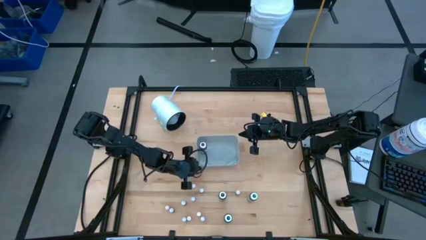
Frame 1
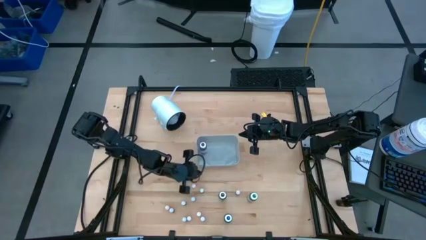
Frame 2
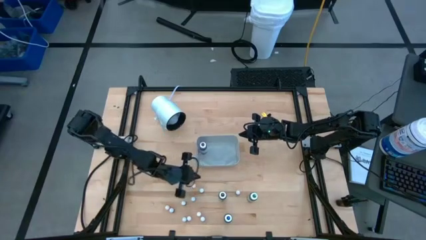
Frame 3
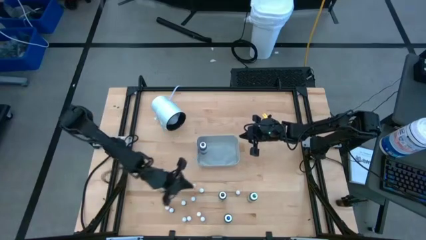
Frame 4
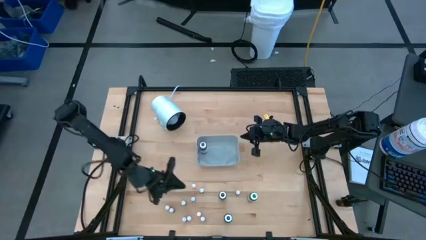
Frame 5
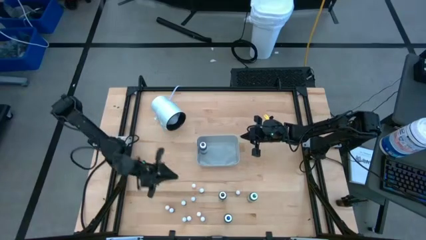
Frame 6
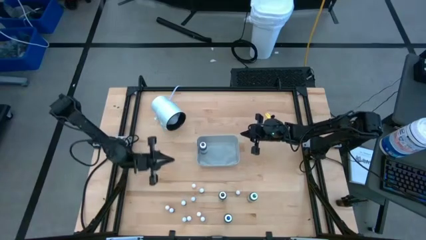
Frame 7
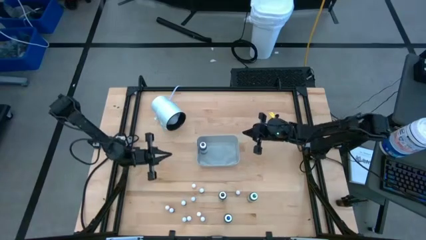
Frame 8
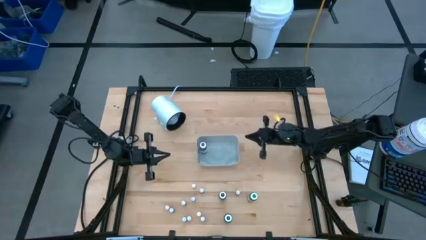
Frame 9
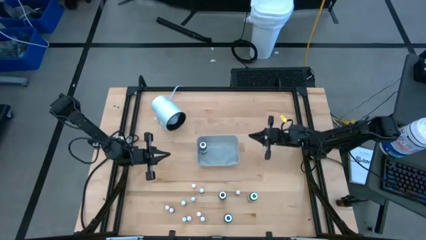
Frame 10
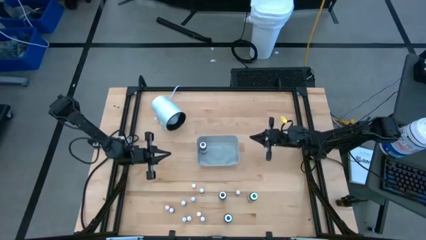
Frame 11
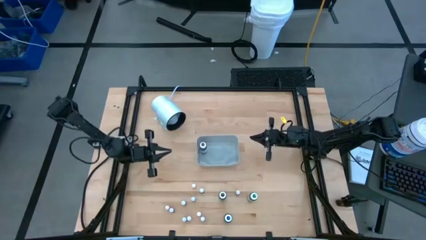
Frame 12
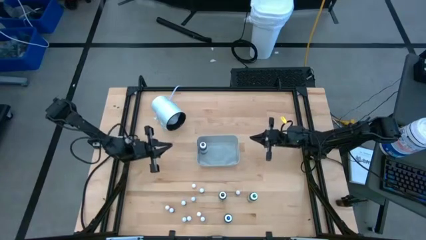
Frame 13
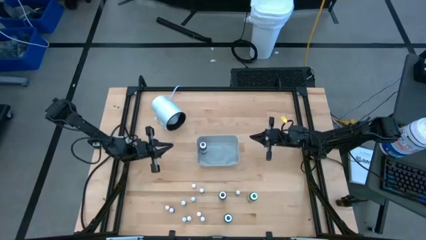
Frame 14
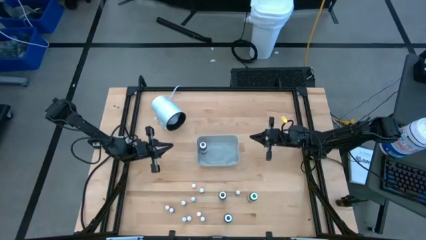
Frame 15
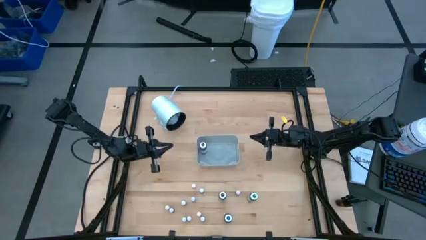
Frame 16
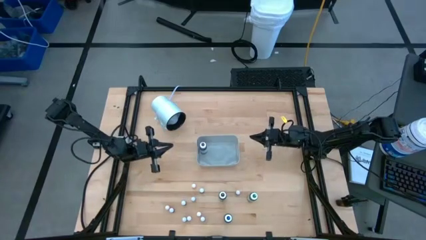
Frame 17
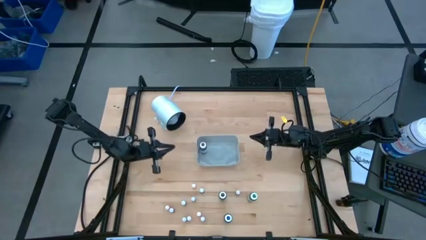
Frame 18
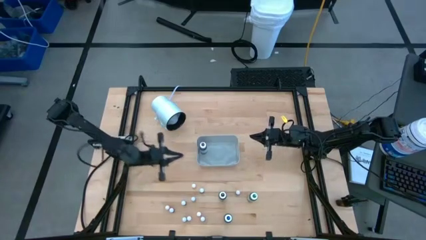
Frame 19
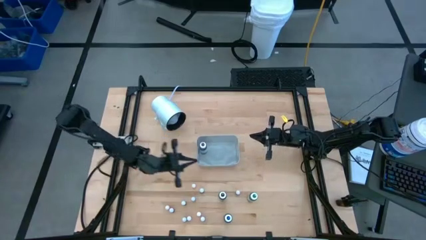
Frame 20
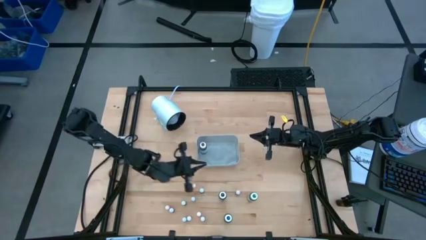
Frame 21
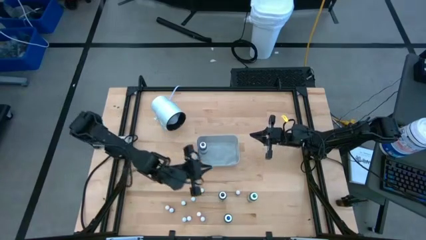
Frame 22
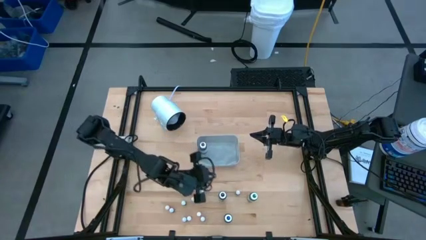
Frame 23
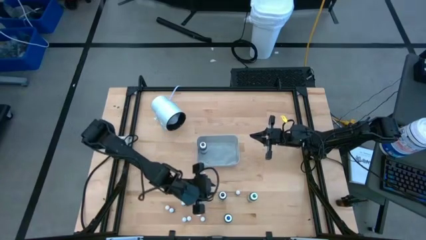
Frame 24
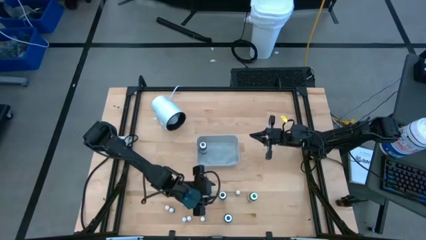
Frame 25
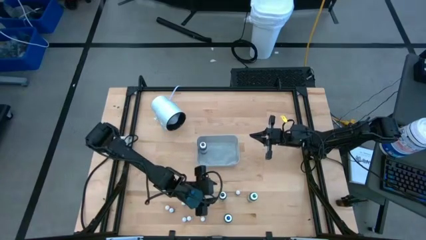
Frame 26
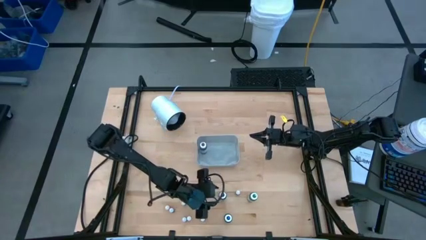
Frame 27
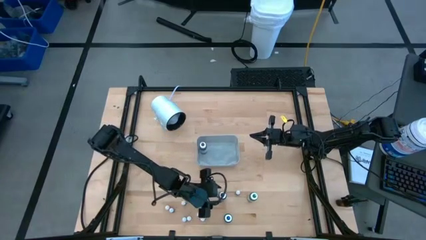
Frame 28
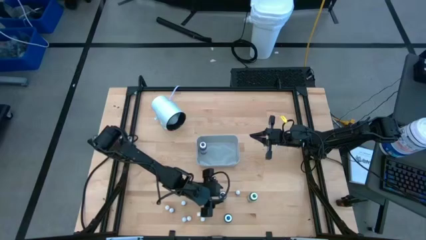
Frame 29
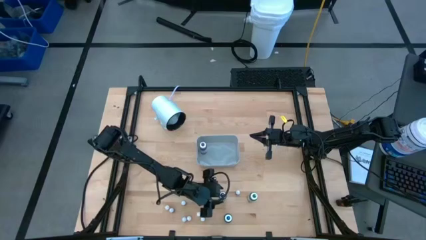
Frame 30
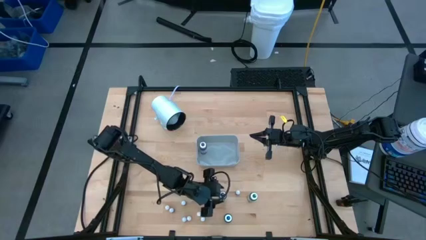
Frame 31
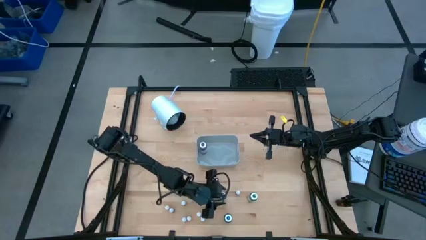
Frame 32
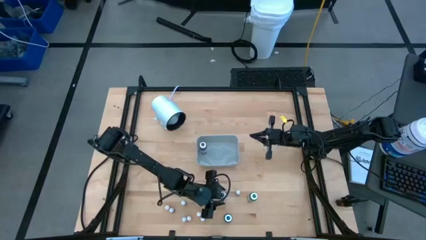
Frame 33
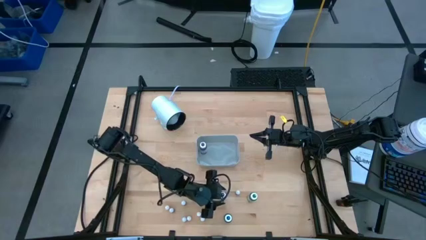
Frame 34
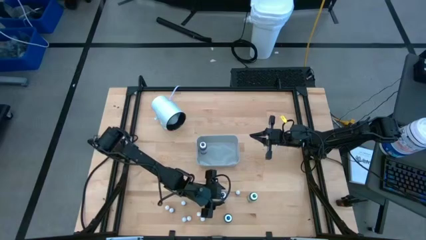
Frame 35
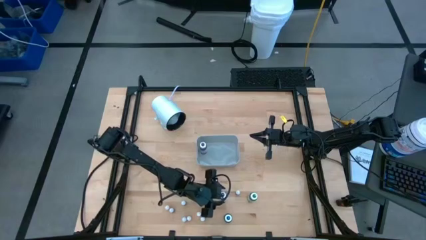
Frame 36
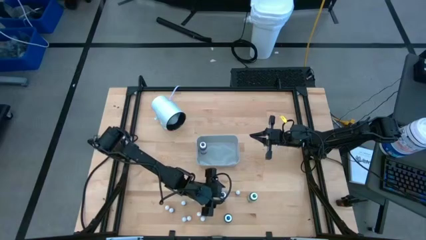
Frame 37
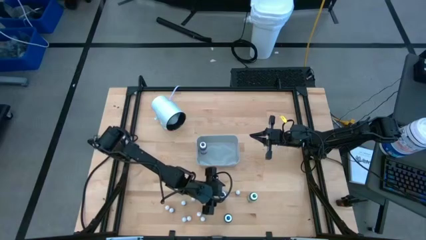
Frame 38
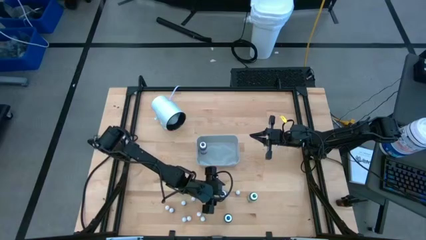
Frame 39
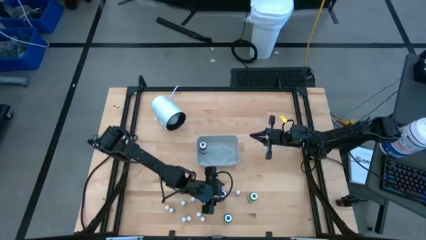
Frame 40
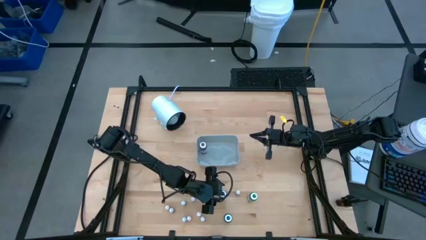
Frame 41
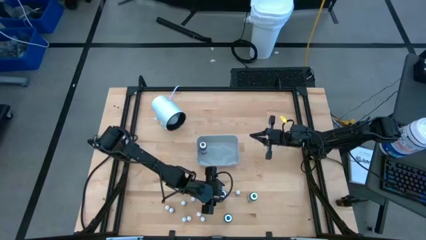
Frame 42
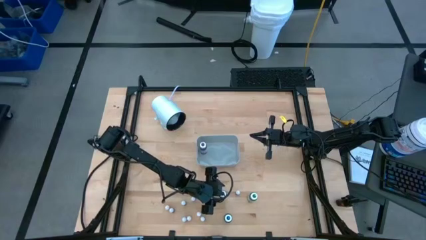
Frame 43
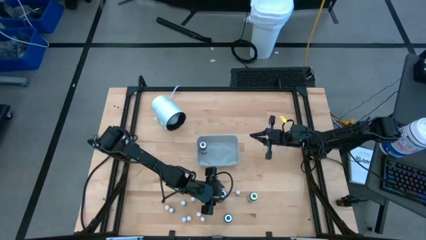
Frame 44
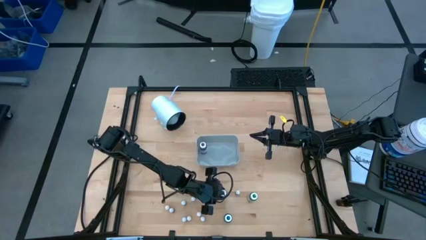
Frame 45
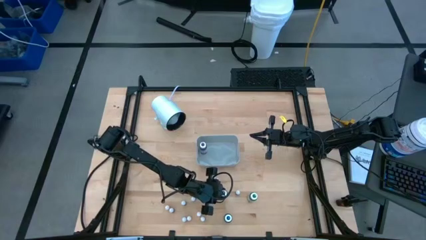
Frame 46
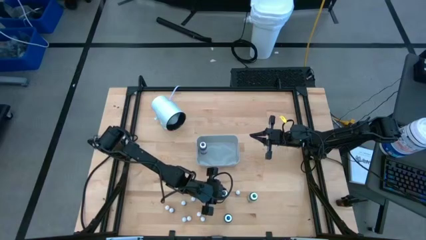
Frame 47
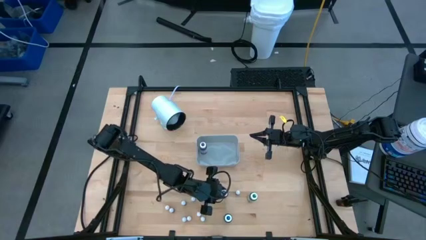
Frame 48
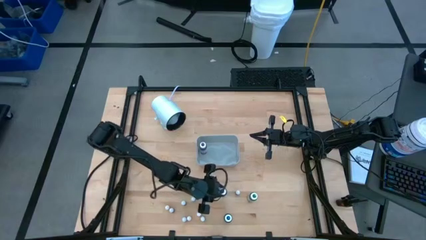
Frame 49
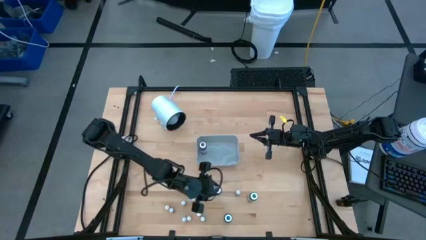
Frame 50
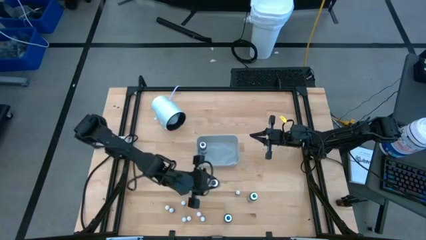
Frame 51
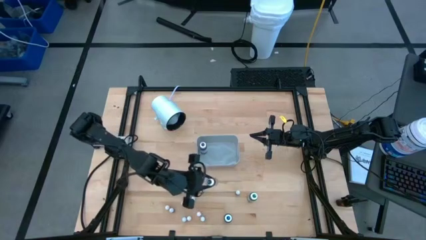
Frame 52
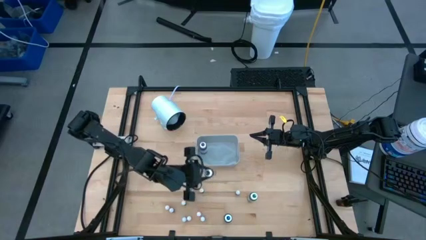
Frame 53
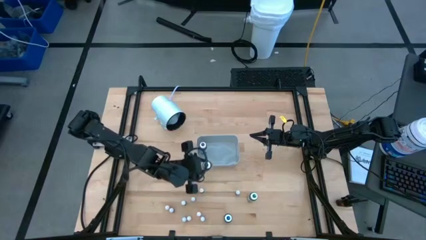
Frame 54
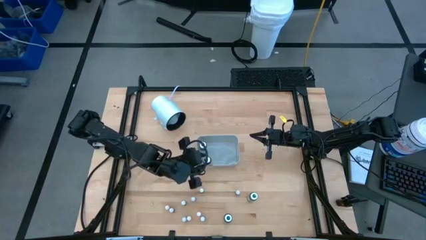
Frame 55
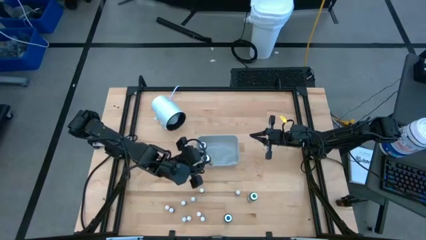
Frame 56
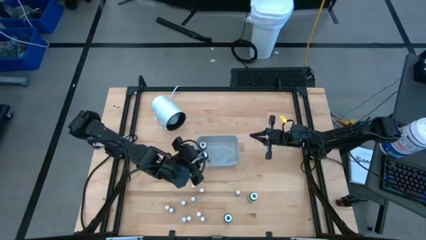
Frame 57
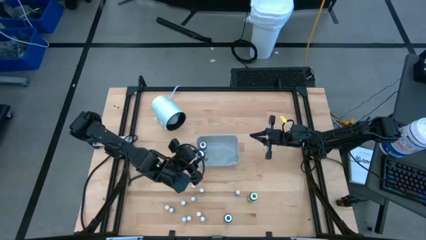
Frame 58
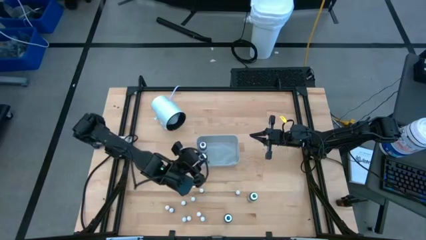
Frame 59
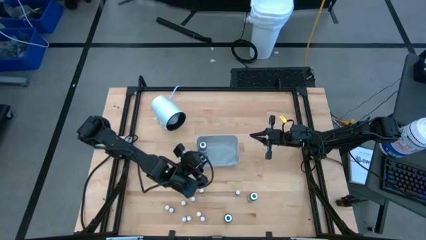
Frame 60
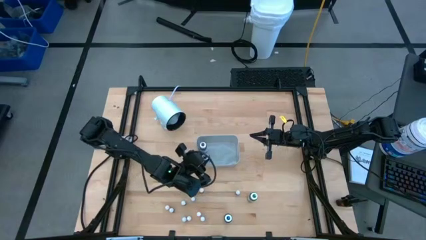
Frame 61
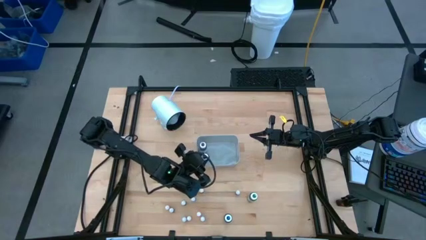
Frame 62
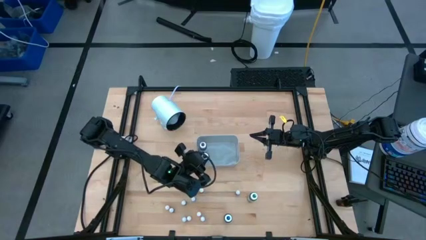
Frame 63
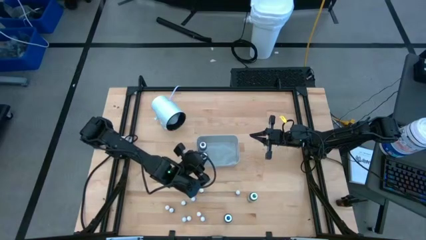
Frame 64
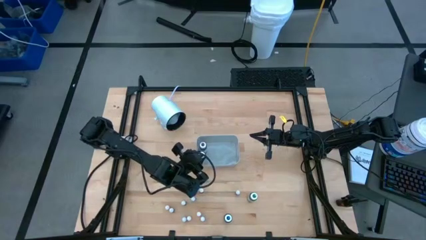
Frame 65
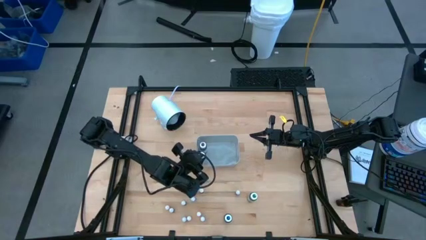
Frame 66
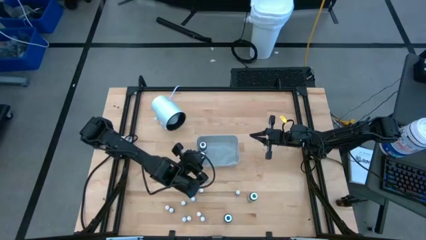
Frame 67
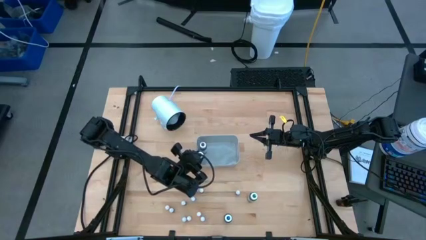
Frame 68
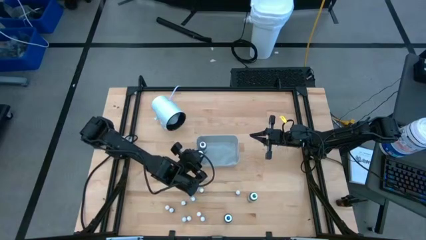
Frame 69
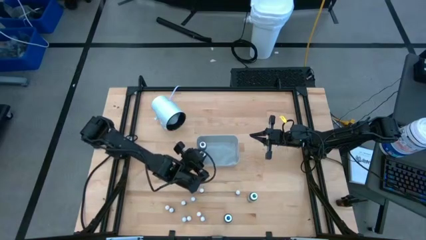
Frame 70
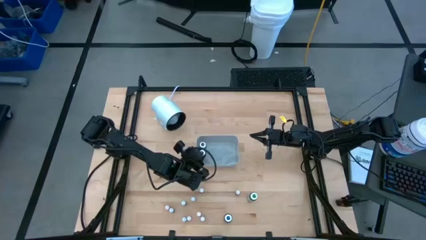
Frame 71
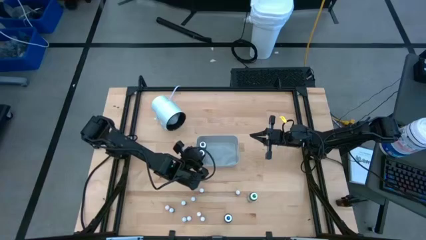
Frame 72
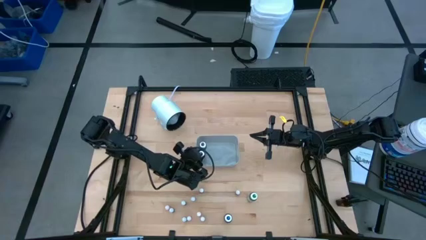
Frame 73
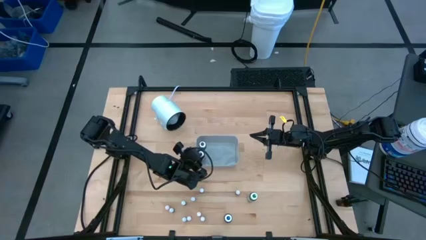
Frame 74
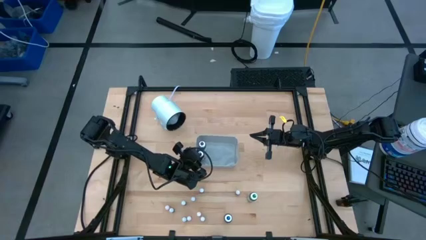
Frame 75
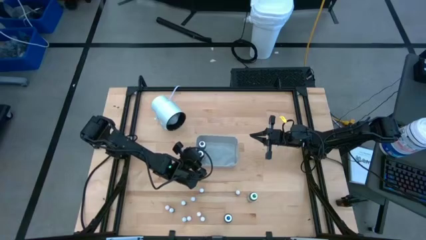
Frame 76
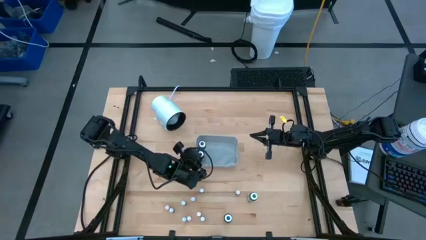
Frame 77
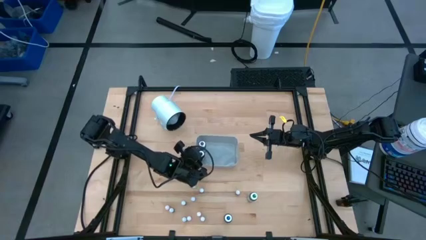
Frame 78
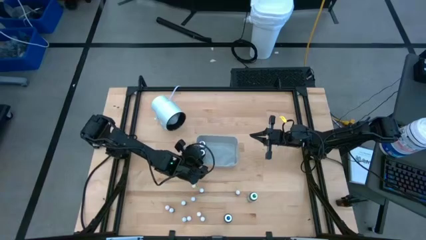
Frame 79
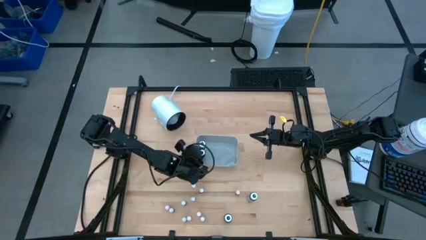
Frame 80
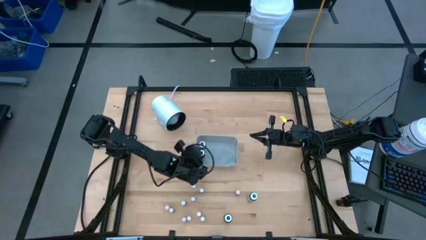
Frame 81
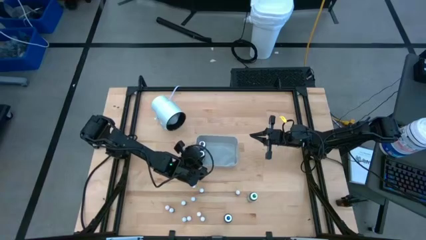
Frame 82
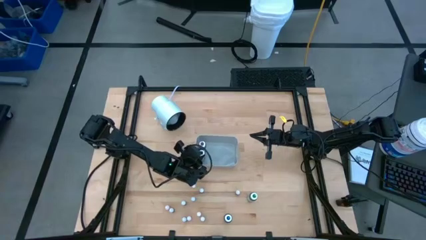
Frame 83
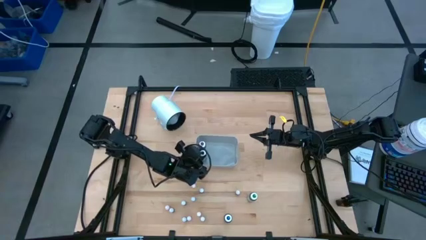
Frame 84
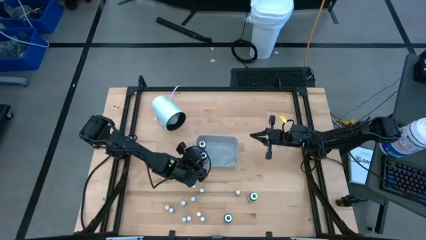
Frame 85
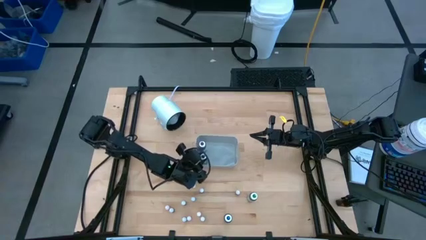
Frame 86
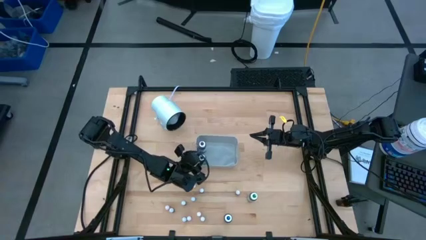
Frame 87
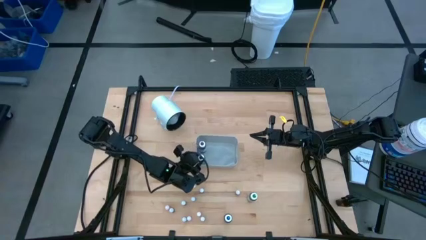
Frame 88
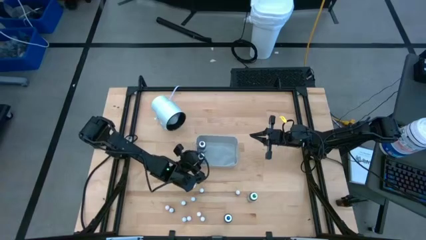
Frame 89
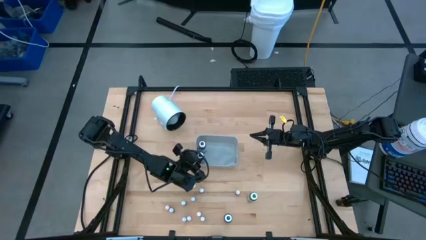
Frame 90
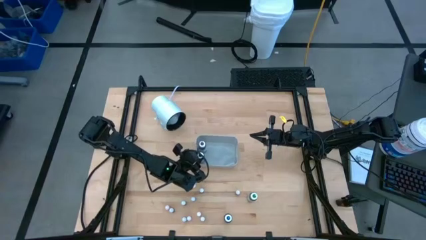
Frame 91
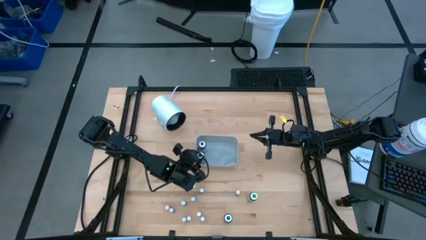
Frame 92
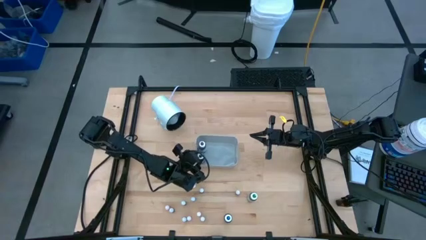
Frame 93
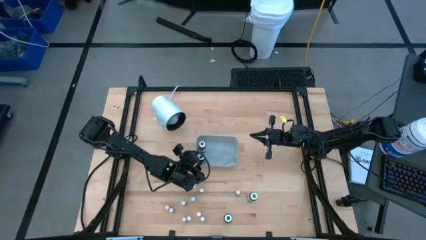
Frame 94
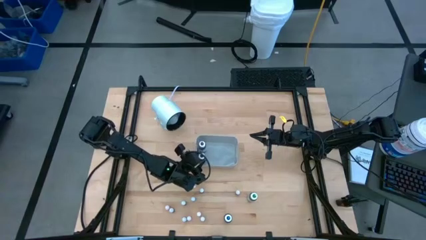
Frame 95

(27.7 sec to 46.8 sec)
Task: Pick & Place food coloring
Put the big black food coloring bottle into the gray bin
